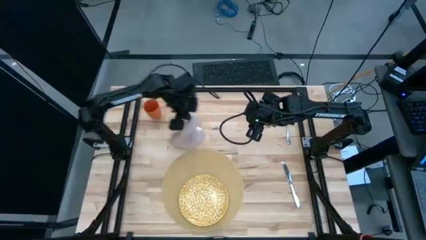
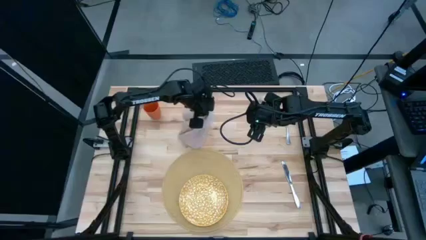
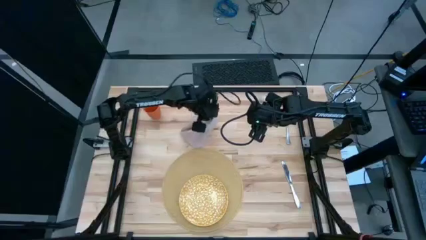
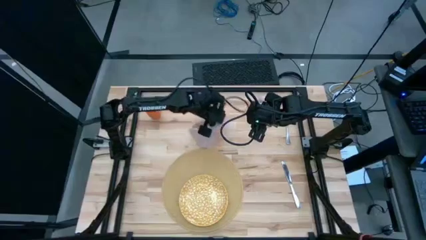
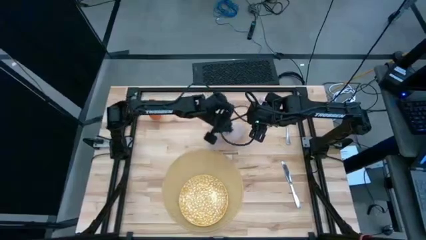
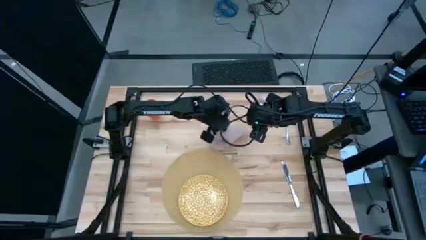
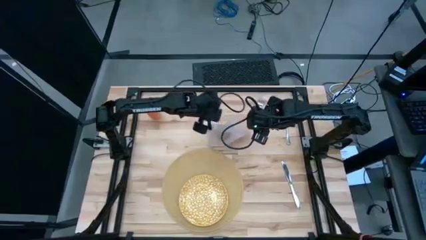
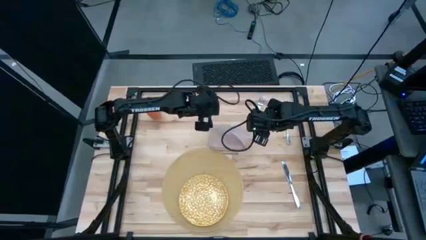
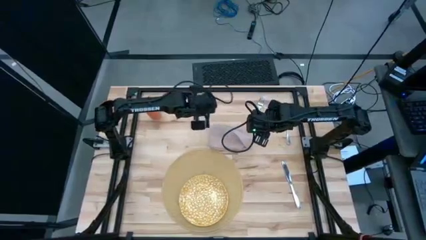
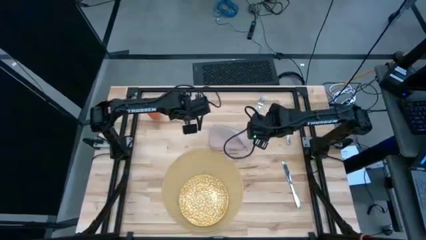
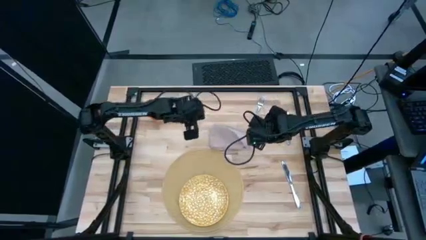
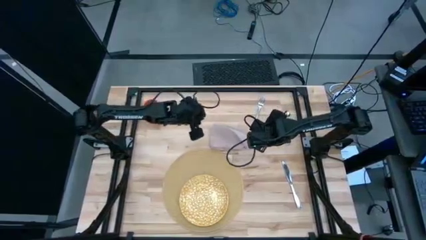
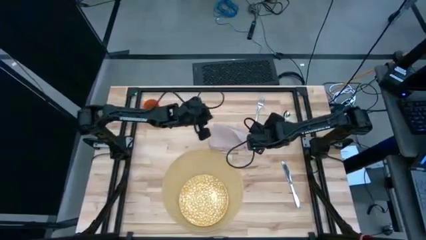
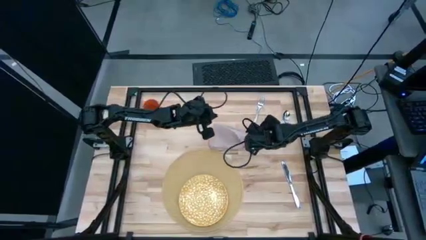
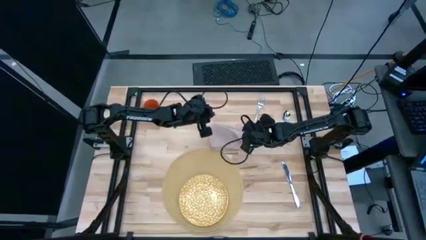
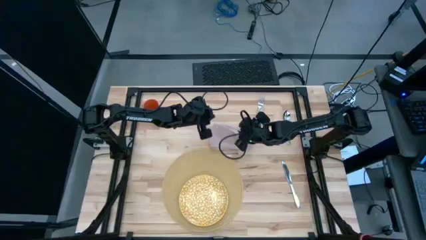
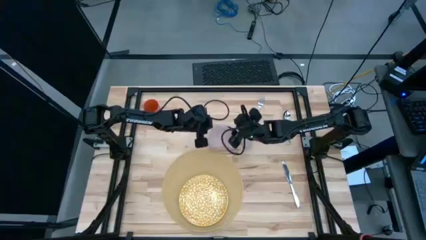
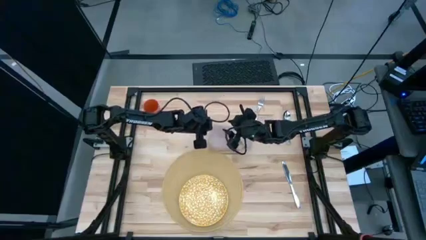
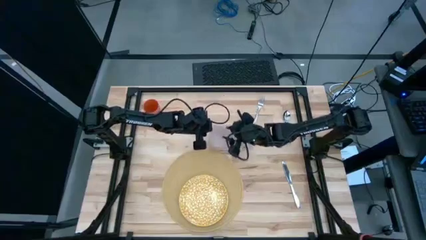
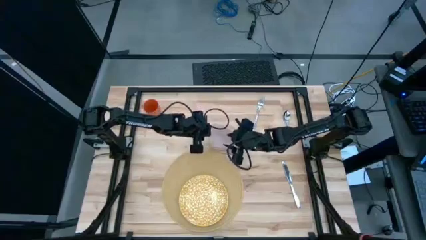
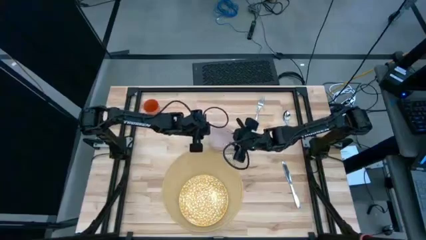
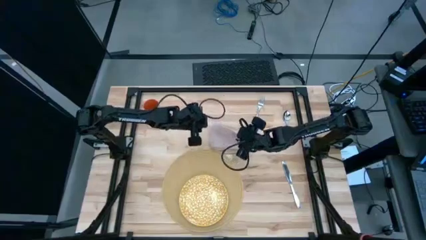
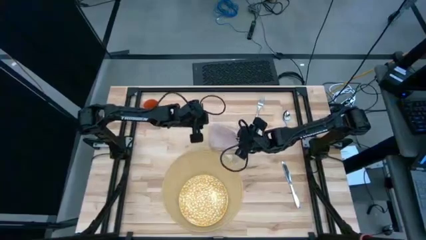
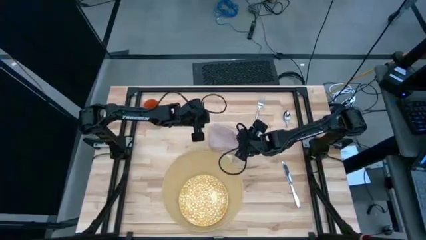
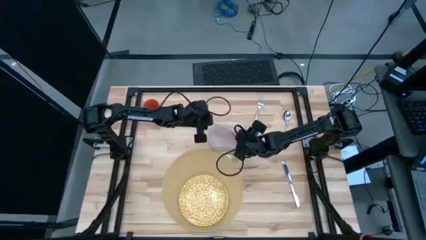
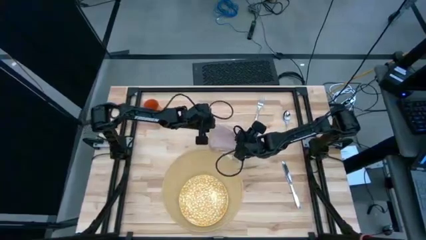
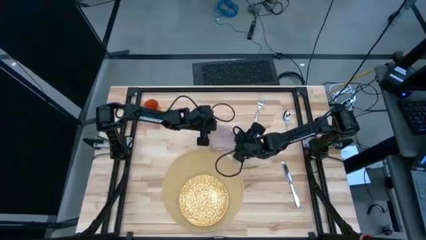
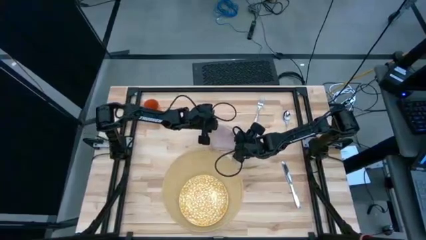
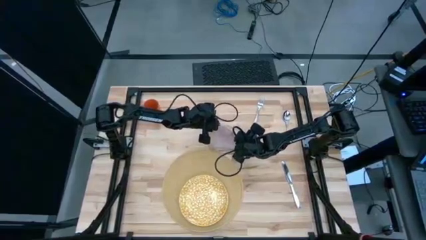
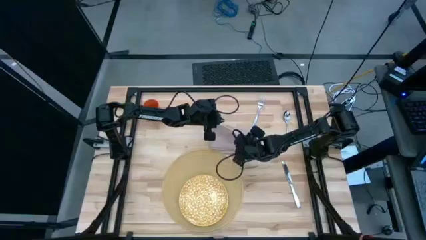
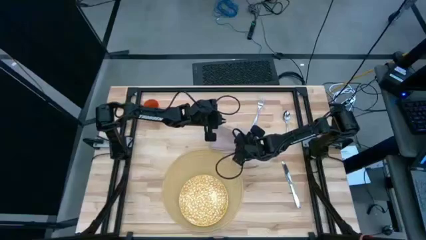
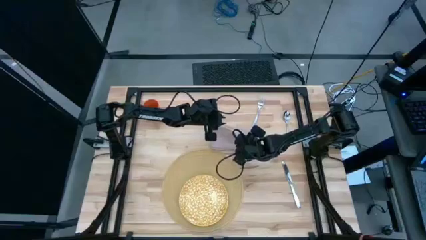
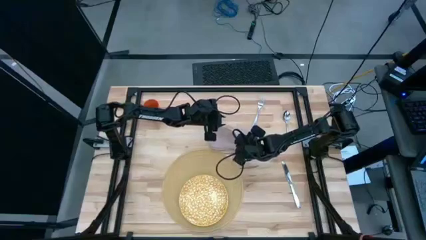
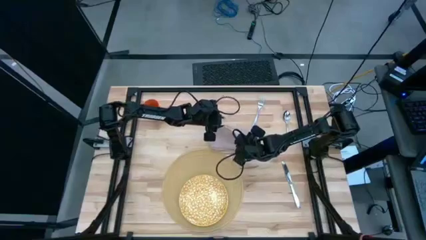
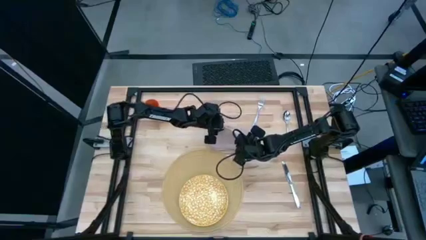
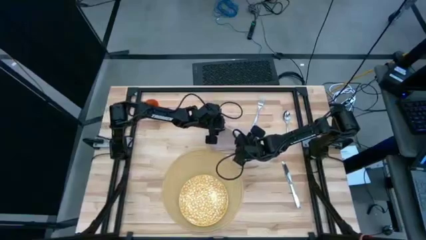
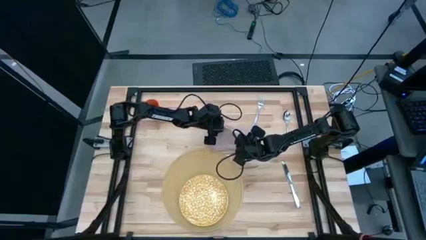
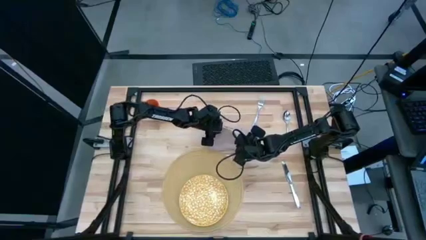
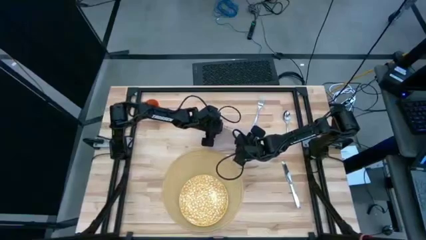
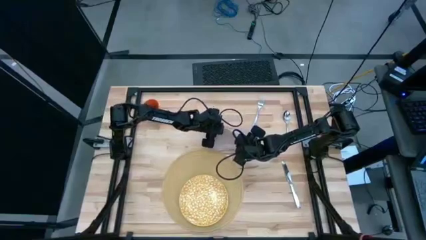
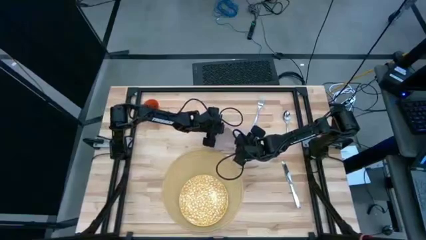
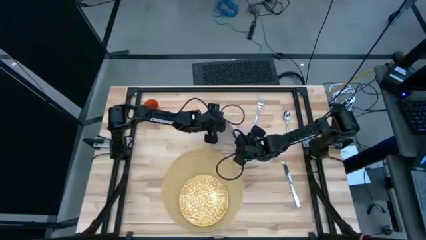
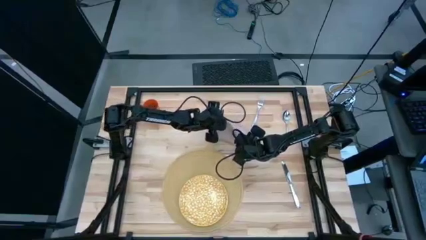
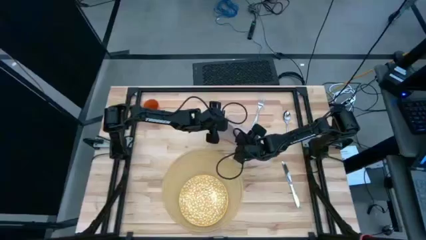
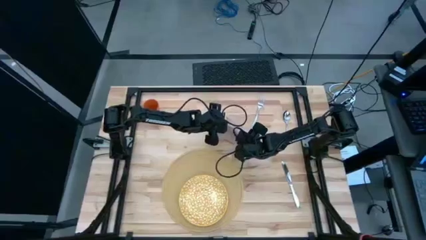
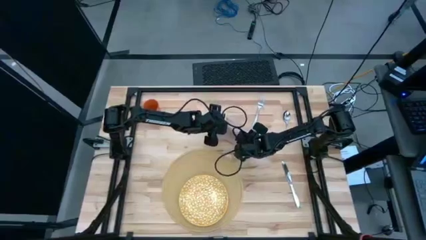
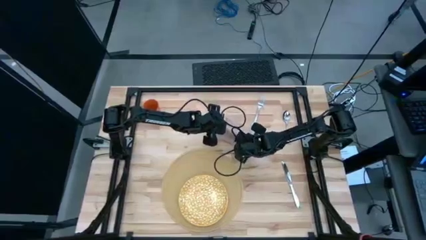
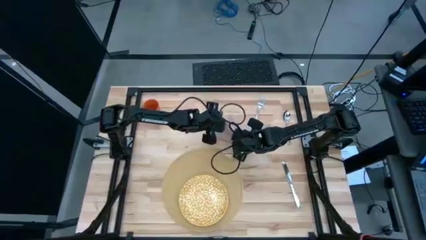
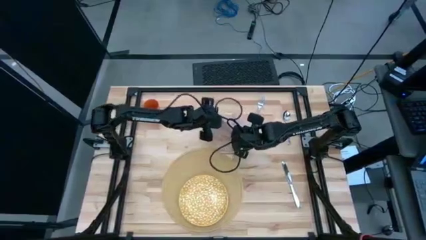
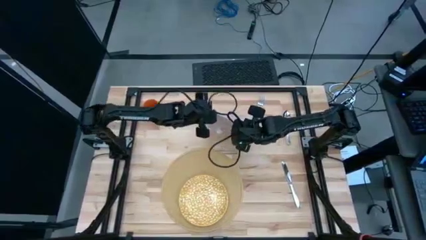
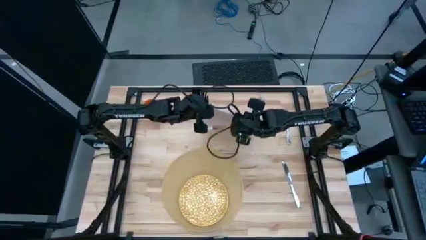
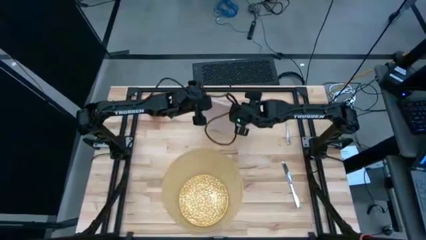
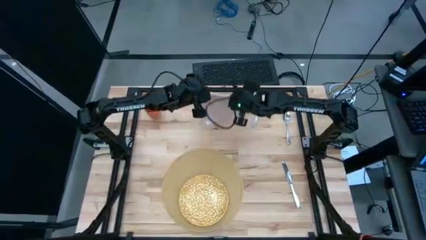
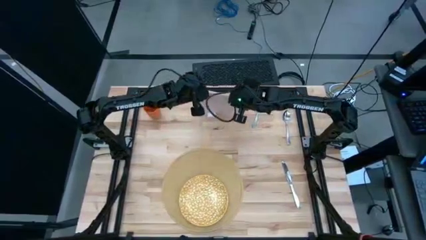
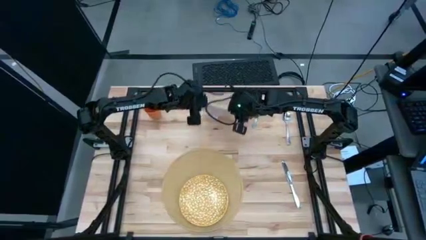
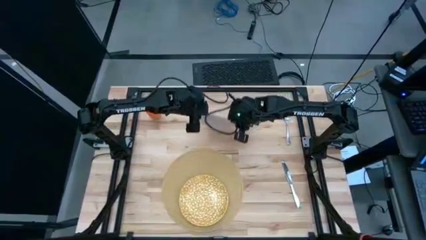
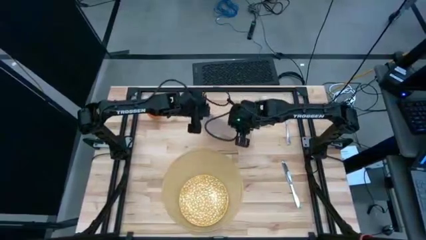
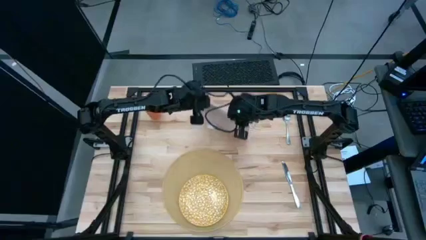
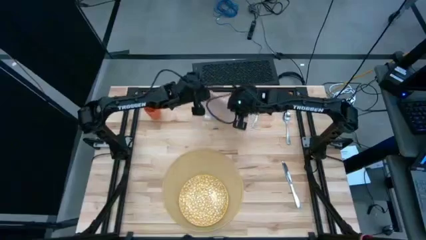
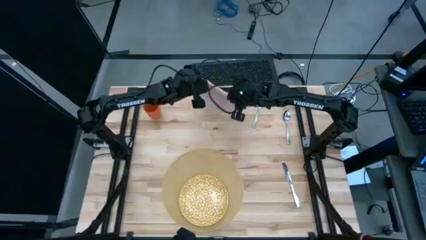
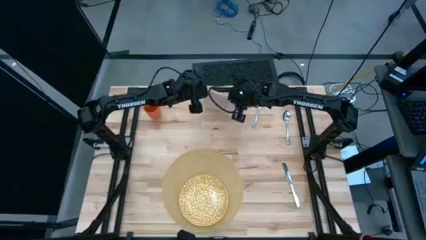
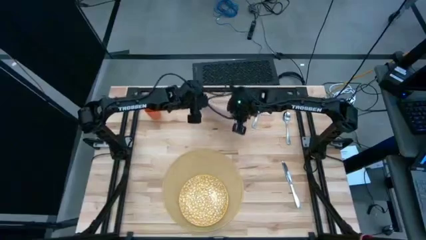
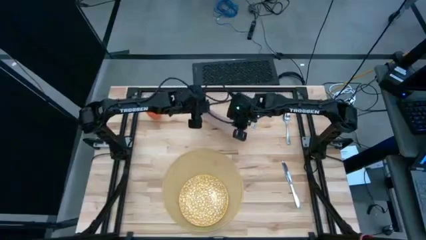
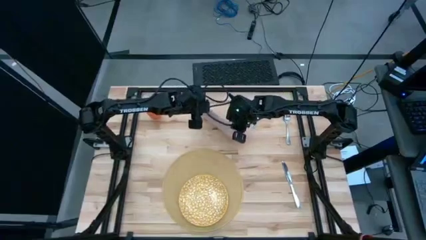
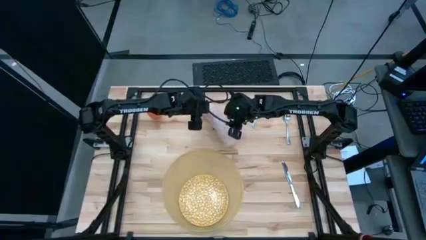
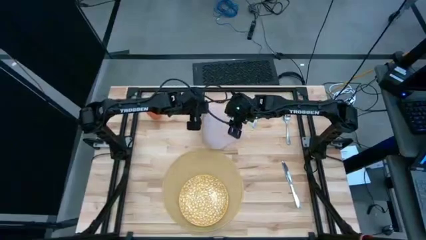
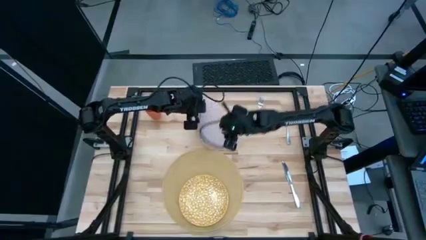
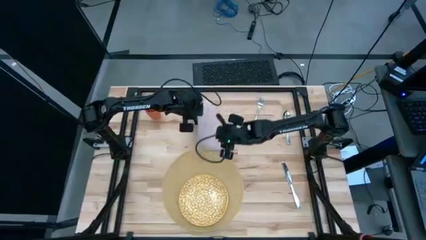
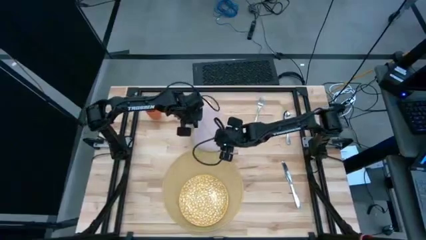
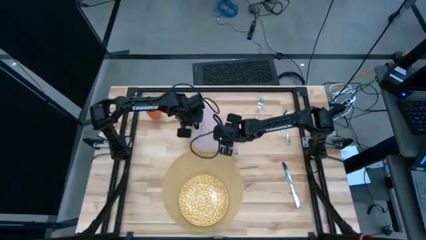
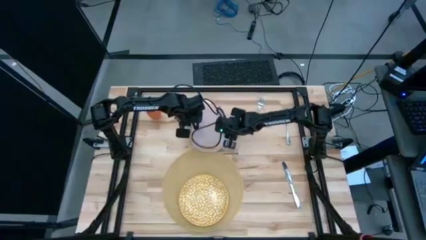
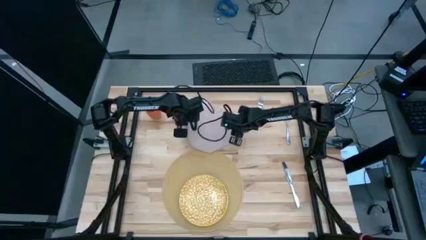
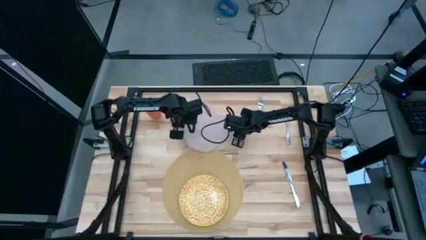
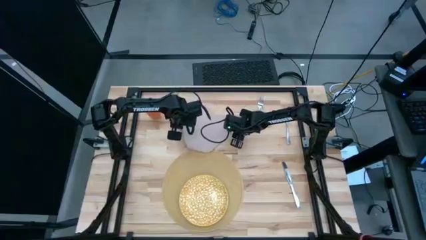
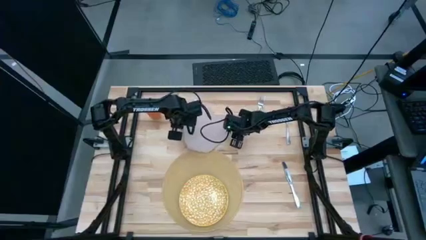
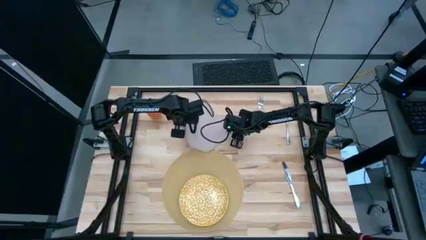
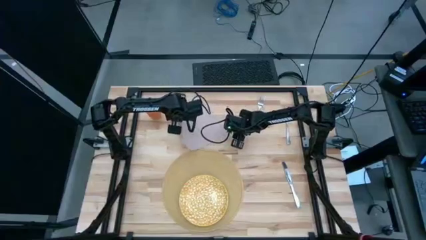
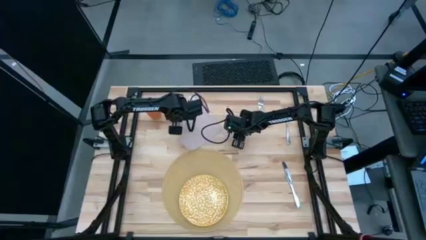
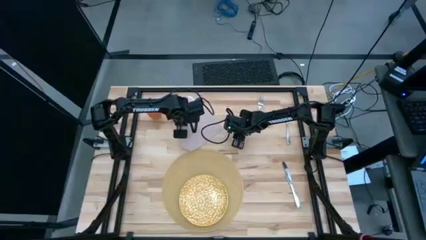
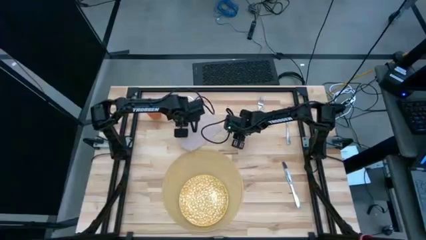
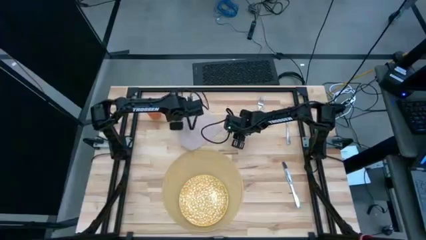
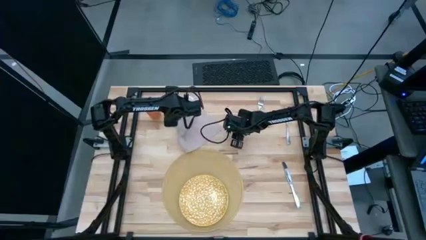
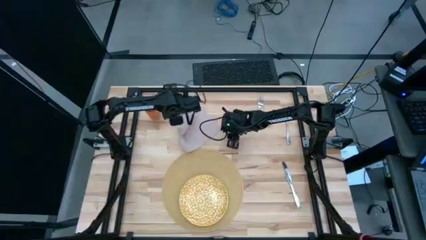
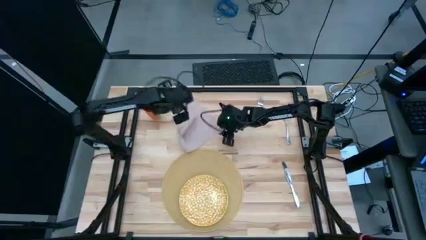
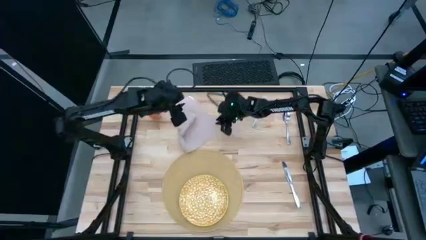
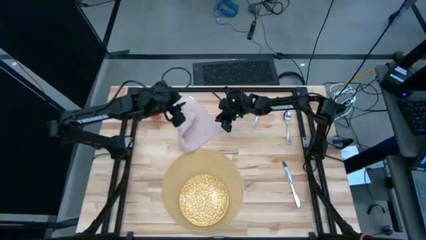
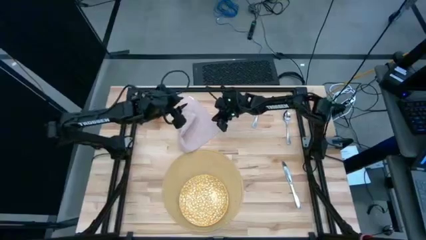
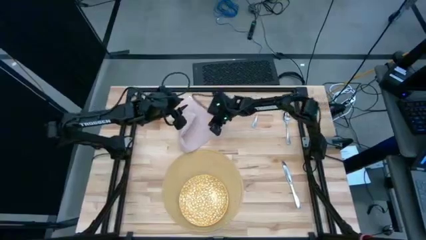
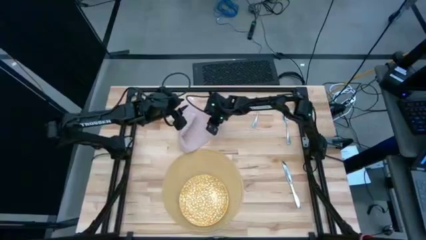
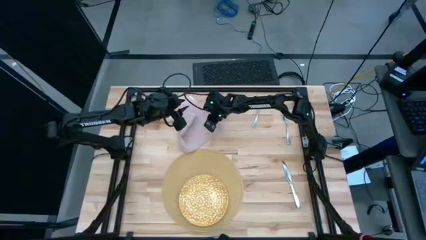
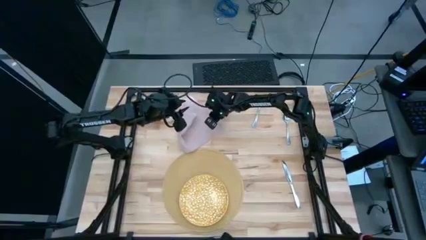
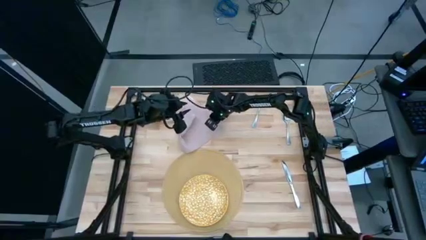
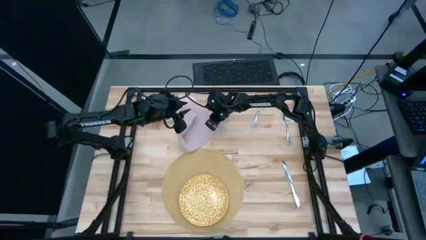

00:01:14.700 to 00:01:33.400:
Task: Set table place
Fold the light orange napkin on the table
